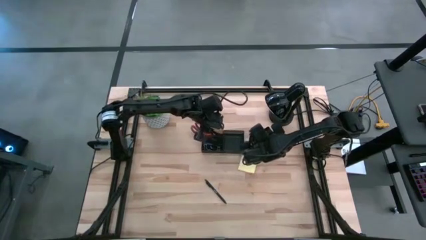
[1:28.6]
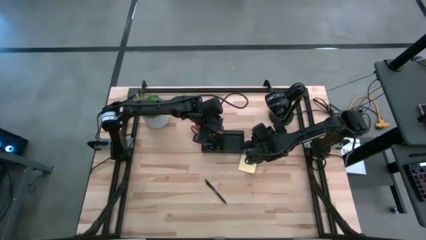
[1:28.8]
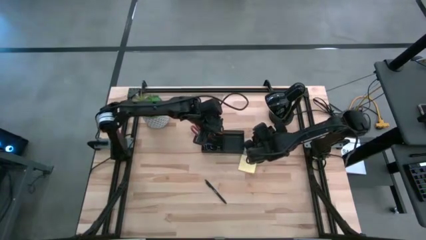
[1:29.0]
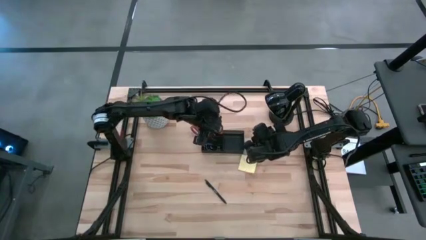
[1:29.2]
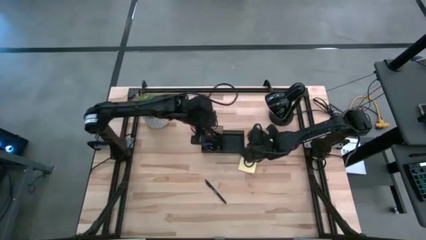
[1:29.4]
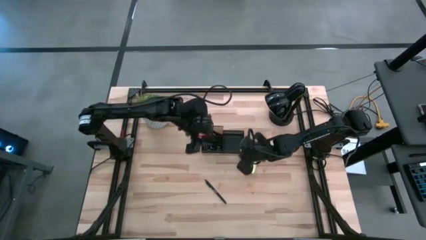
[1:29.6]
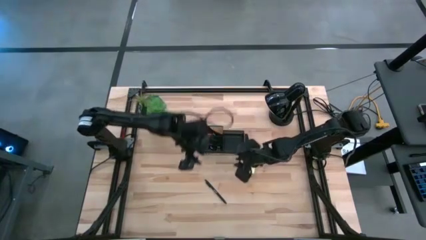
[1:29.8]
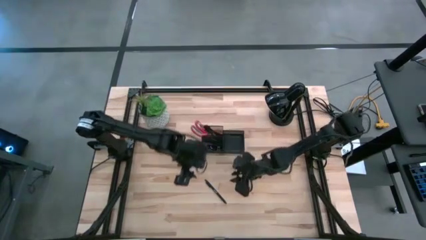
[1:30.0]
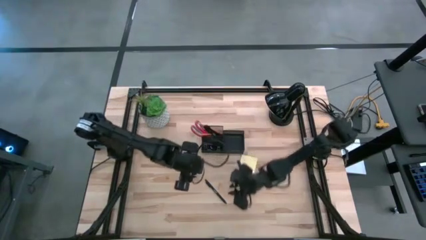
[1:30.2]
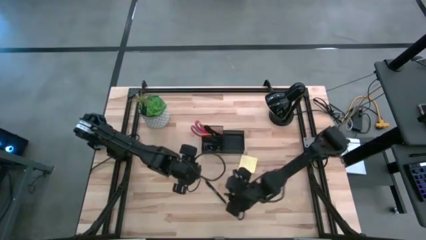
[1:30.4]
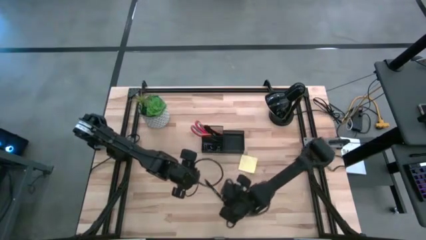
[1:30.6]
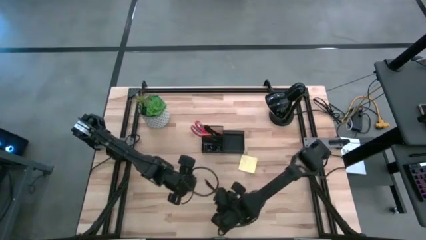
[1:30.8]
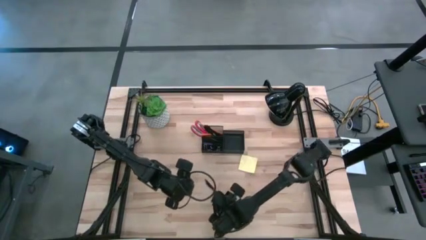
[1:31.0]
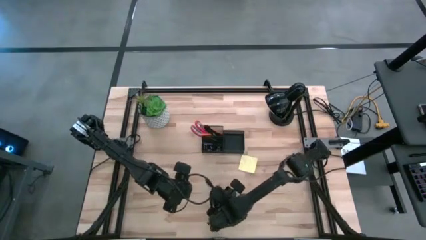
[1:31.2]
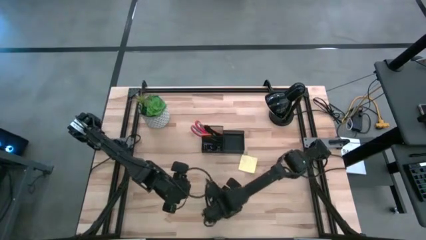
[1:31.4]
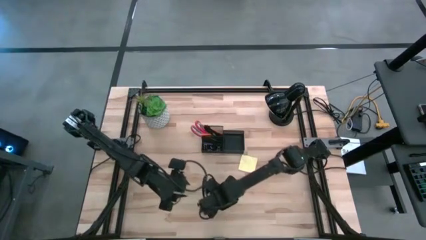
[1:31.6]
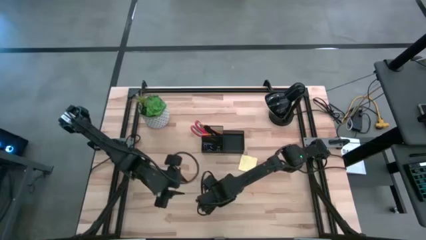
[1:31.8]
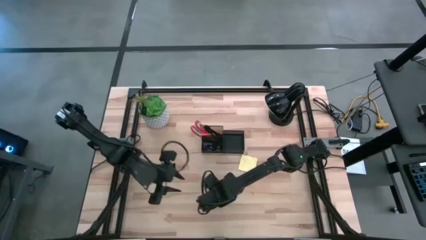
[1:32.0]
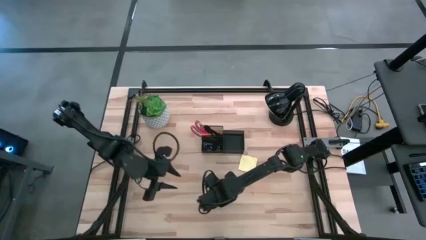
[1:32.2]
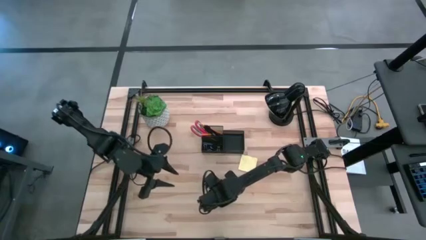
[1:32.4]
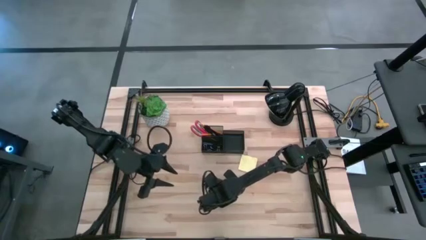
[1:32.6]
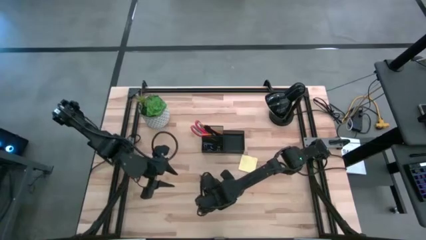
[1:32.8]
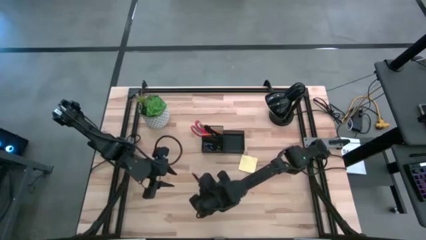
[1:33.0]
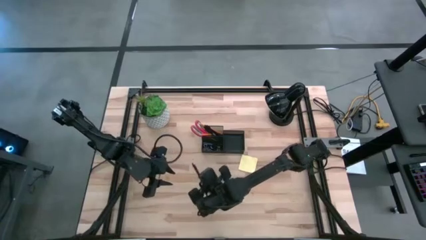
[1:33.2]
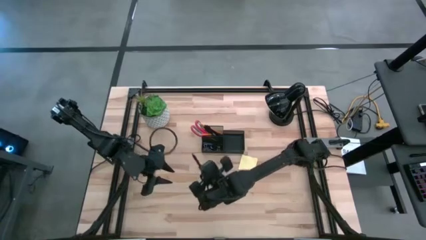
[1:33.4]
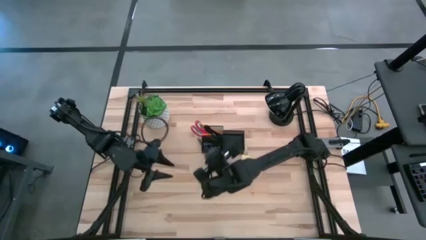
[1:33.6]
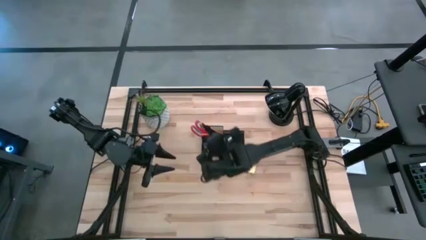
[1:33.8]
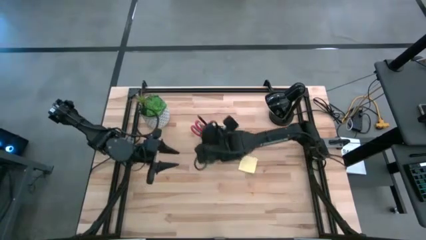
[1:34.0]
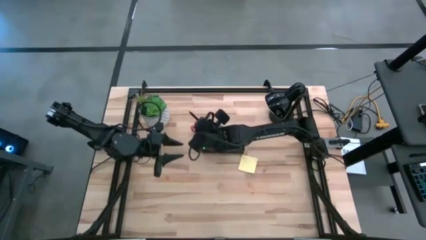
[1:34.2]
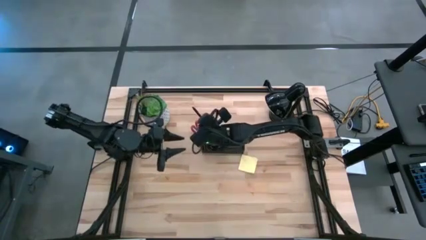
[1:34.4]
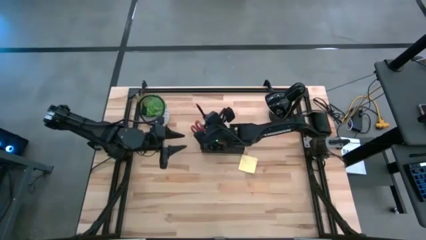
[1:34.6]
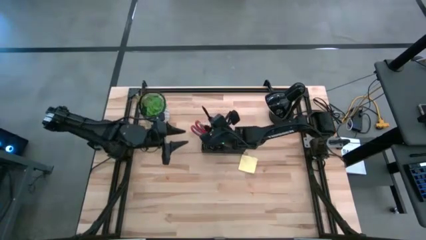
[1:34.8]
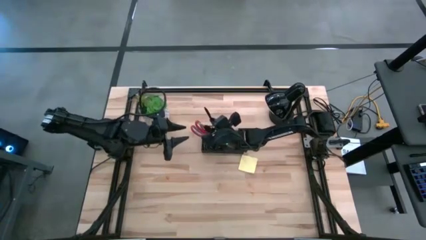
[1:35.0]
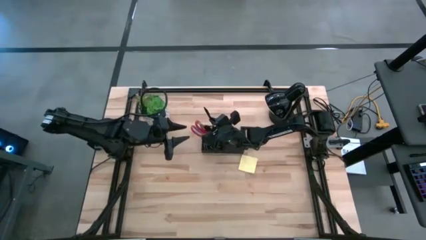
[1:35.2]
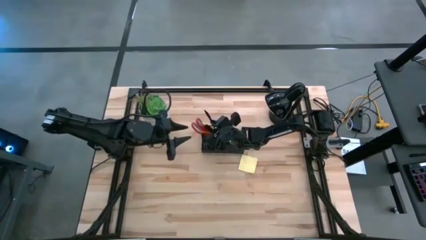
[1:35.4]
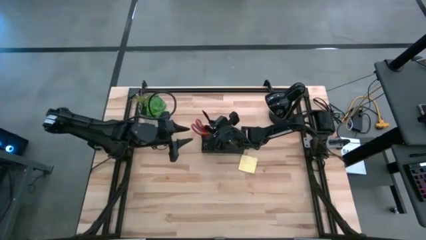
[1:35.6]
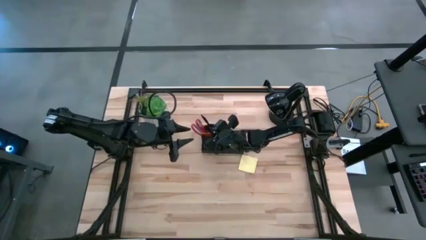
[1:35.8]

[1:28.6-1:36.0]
Task: Pick and place office supplies into organizer
Put the black pen into the black desk organizer

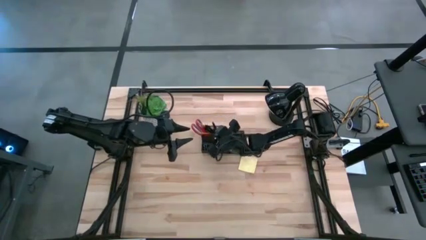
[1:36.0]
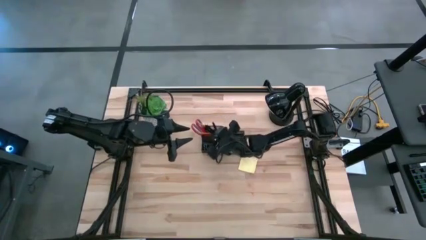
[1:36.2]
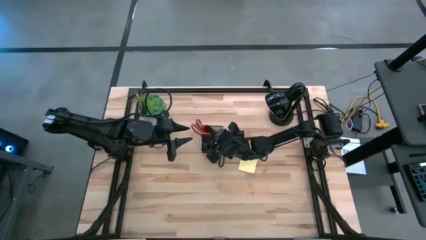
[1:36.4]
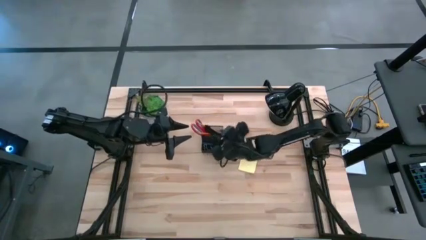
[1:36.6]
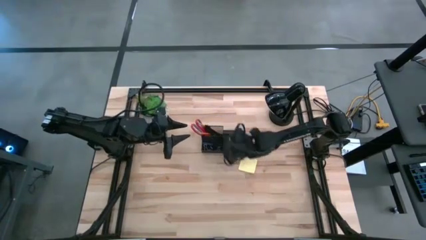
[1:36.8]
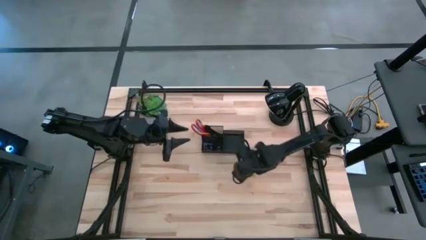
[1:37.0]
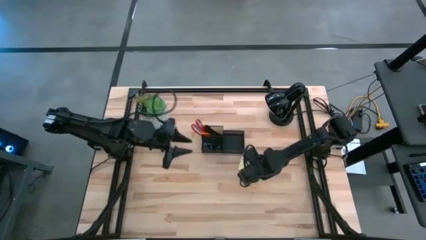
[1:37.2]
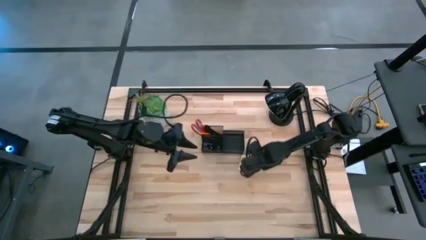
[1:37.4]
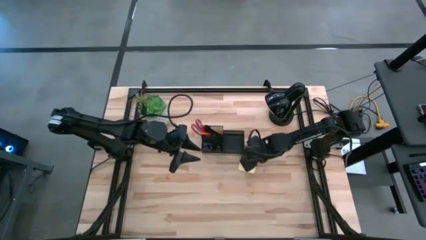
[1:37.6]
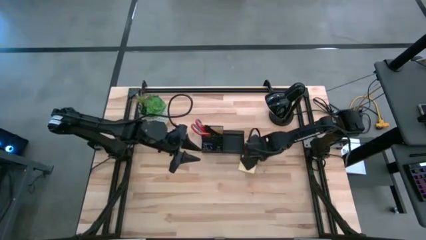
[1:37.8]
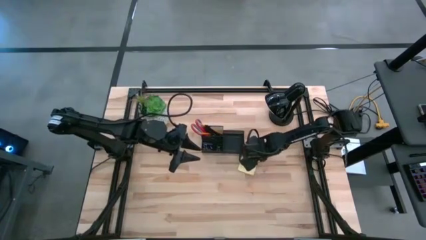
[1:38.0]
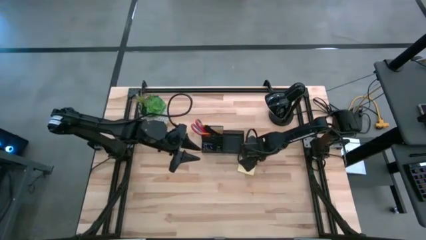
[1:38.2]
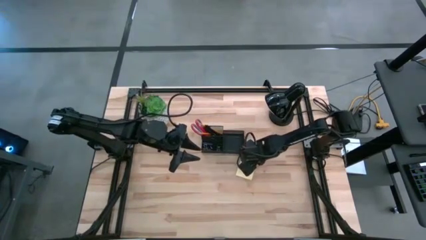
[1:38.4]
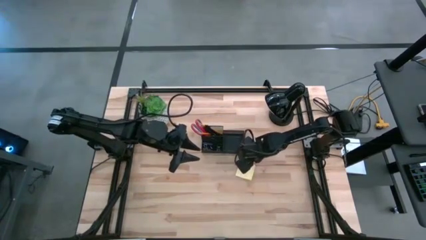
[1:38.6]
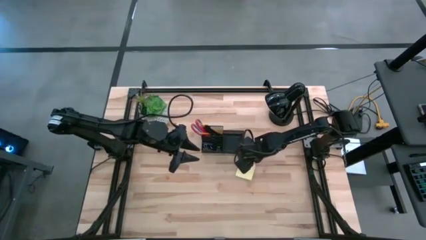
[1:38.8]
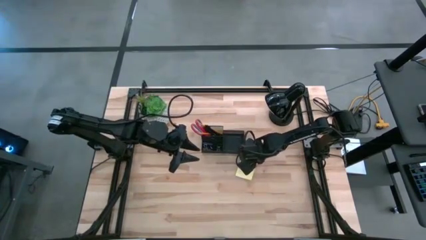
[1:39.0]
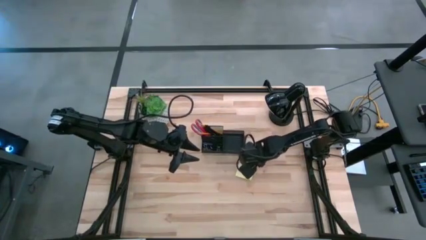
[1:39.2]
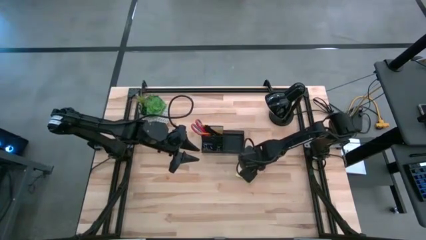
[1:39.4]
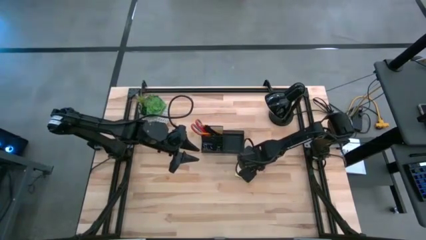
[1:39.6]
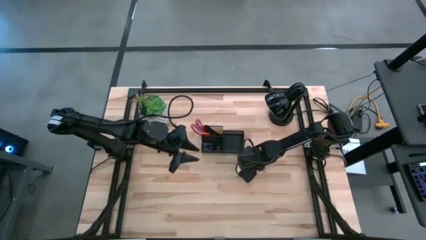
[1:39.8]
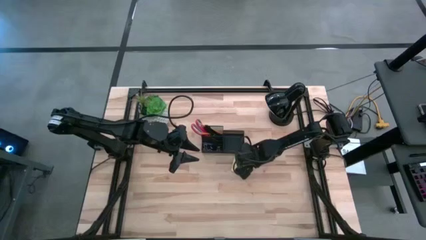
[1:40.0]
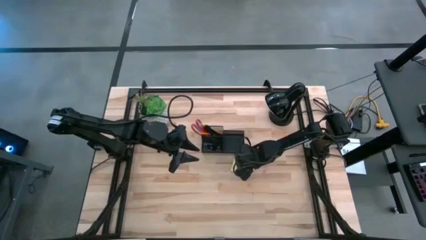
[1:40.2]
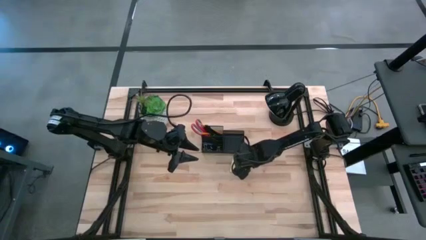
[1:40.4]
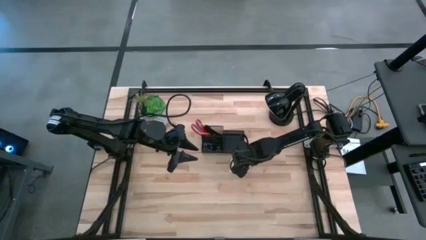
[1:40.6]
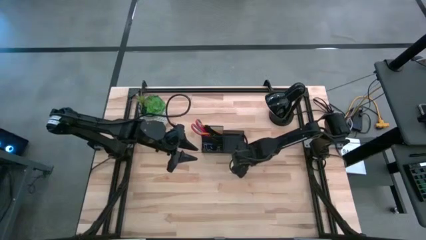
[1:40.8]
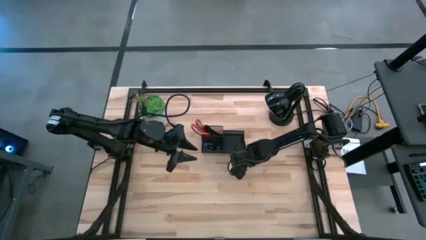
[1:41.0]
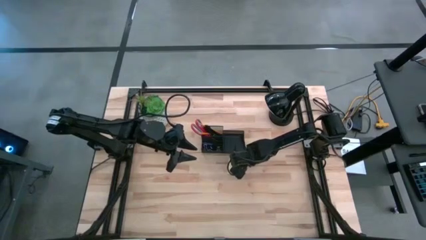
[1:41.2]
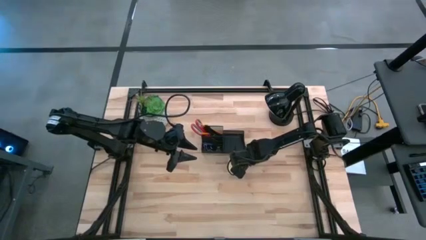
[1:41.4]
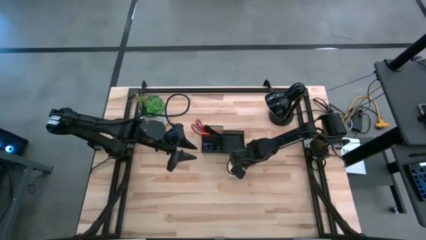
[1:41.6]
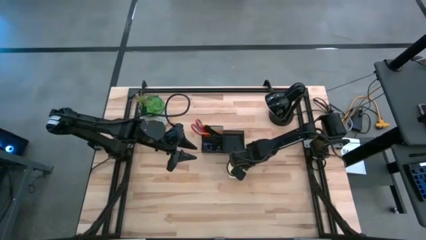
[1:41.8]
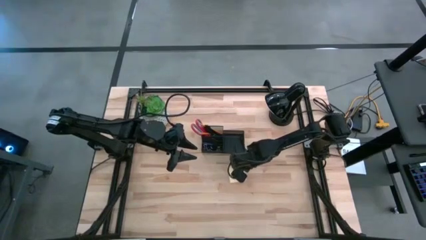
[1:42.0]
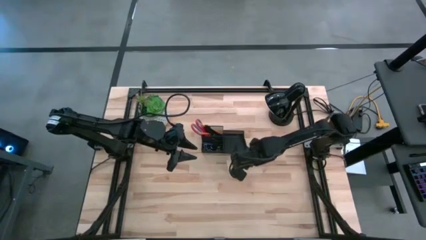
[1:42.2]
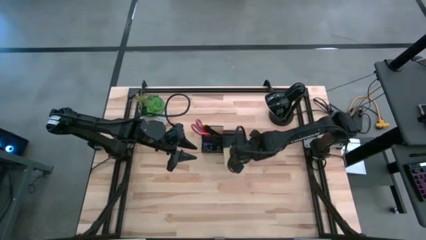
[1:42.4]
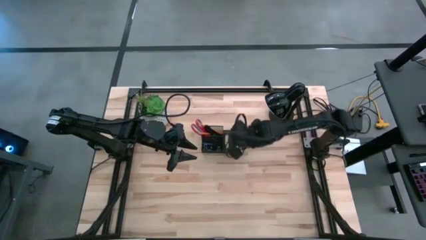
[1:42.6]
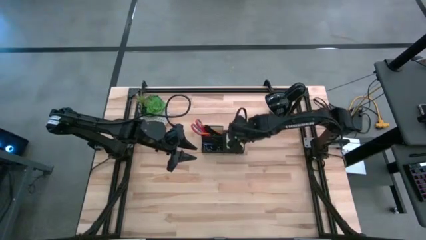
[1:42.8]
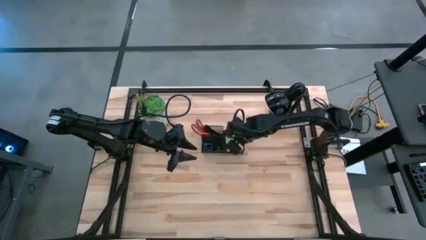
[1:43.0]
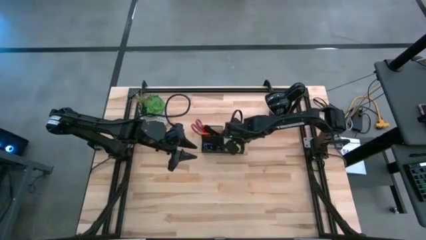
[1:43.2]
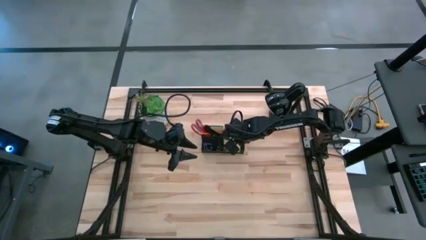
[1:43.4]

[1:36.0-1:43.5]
Put the yellow sticky note into the black desk organizer

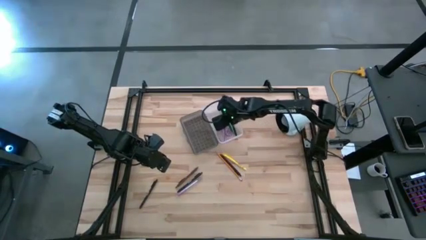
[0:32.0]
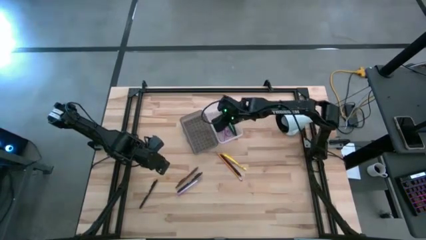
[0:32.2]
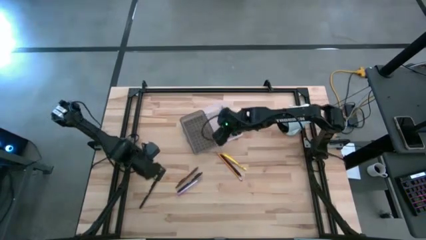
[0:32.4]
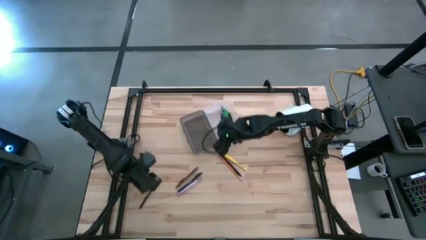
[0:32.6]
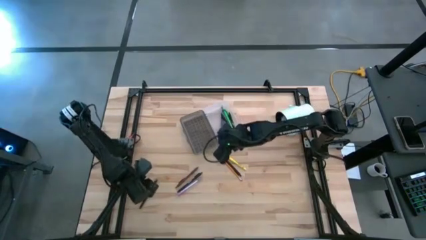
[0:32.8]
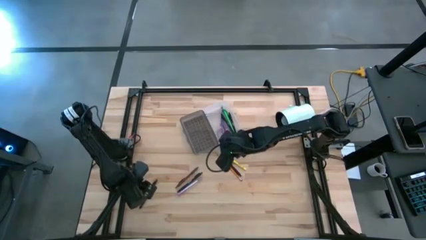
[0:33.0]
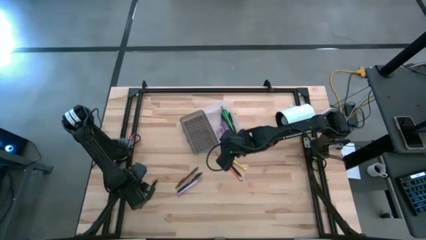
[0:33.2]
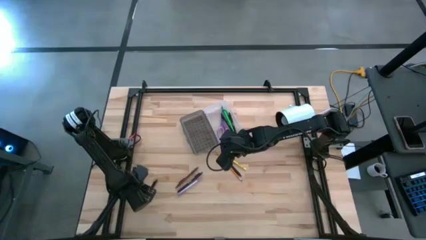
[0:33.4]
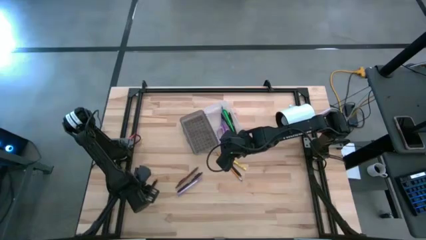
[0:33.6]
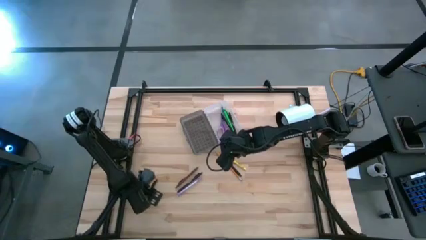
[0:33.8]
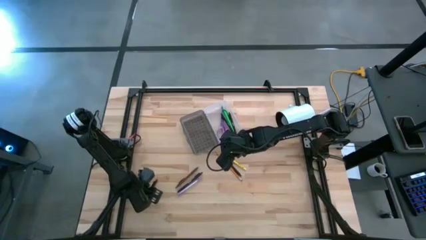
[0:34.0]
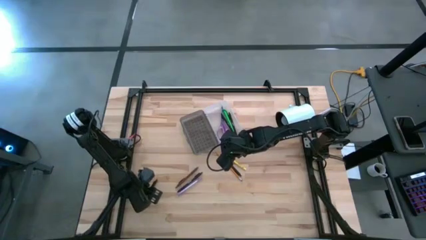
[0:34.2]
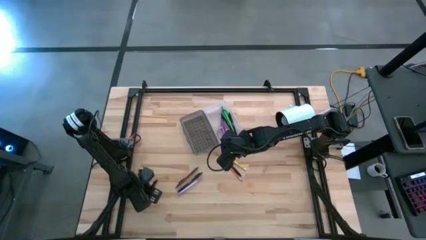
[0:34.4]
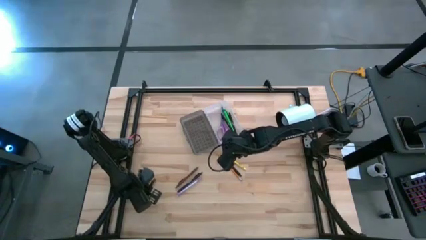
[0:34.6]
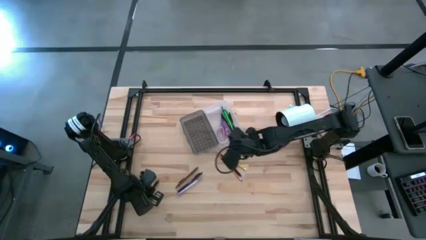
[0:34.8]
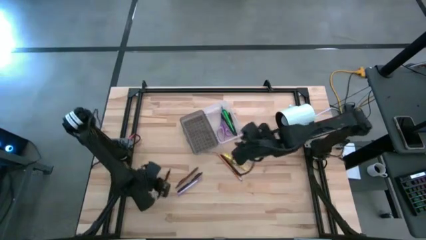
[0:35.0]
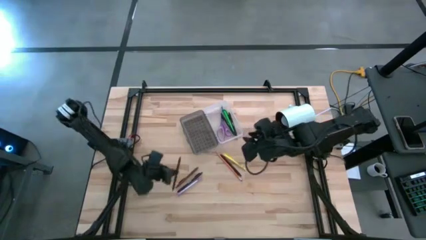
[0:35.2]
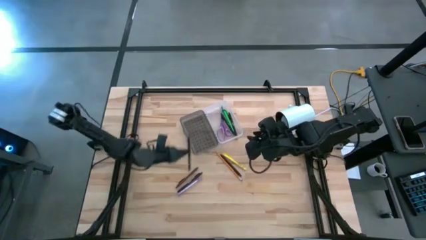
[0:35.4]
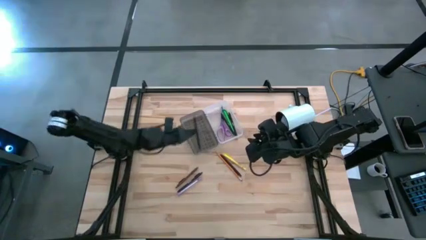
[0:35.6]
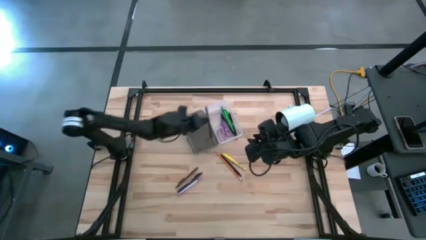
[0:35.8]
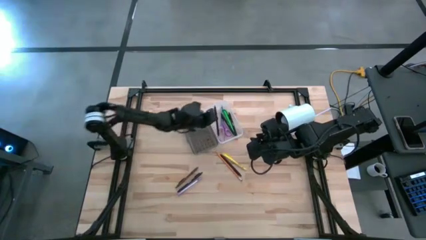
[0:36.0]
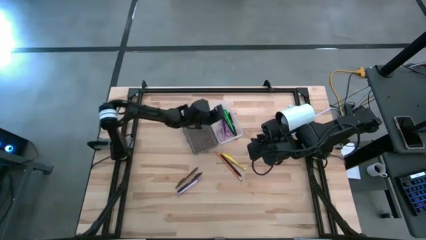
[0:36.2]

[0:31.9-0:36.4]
Task: Pick & place school supplies into a supply box
Put the black pen into the black supply box
